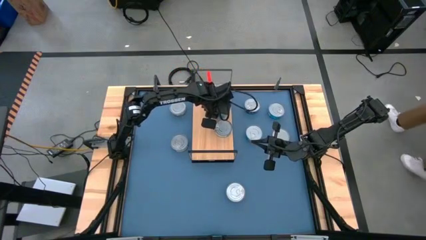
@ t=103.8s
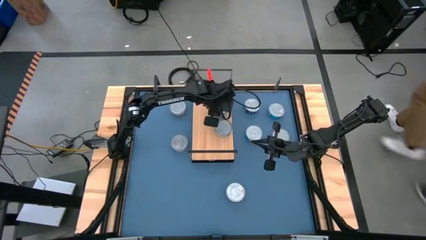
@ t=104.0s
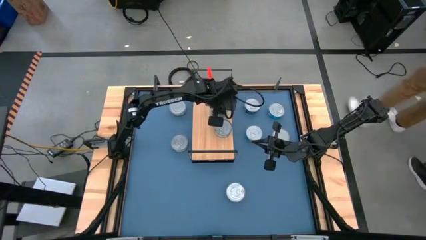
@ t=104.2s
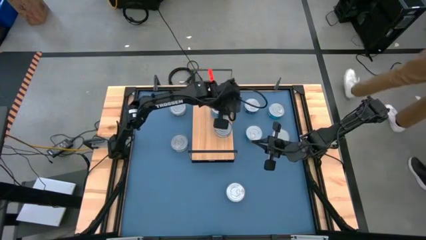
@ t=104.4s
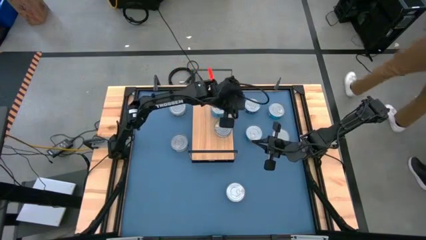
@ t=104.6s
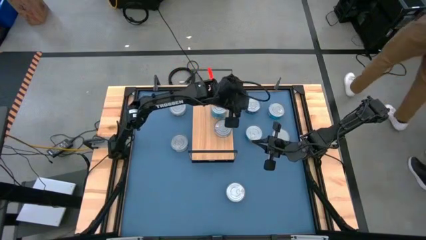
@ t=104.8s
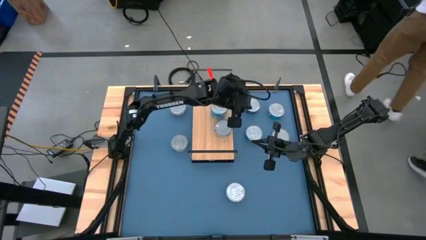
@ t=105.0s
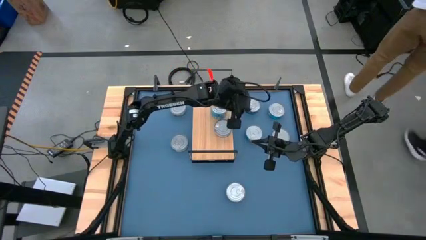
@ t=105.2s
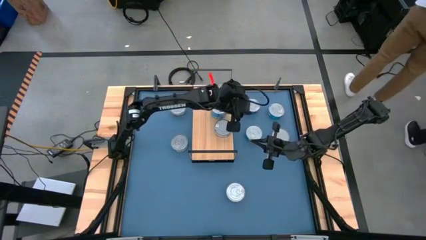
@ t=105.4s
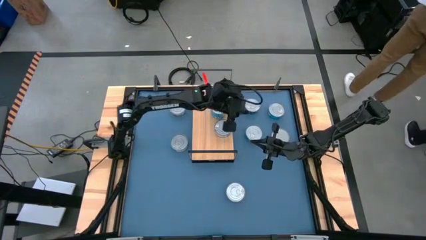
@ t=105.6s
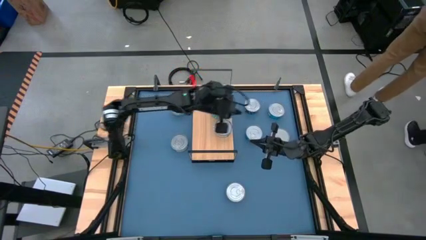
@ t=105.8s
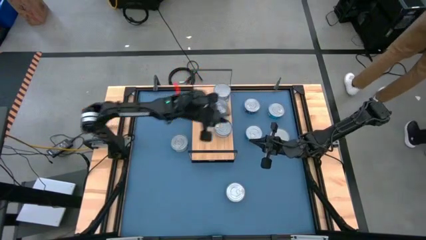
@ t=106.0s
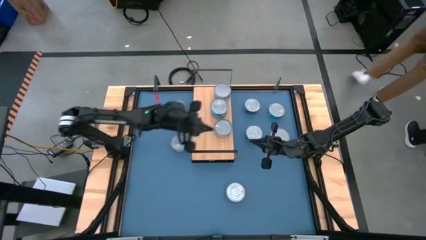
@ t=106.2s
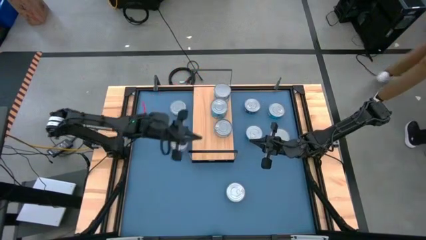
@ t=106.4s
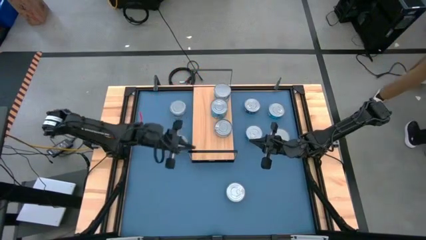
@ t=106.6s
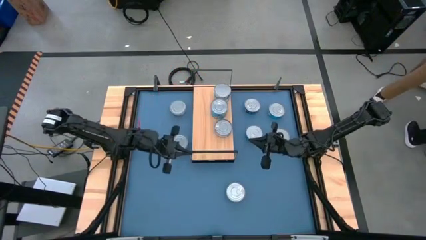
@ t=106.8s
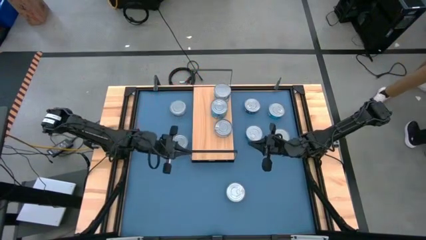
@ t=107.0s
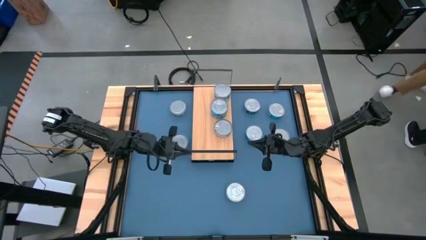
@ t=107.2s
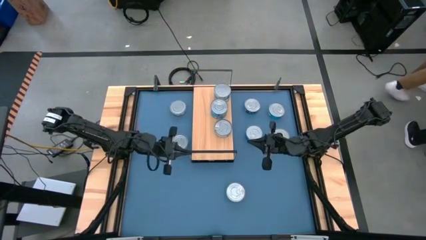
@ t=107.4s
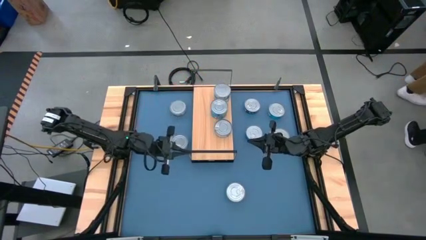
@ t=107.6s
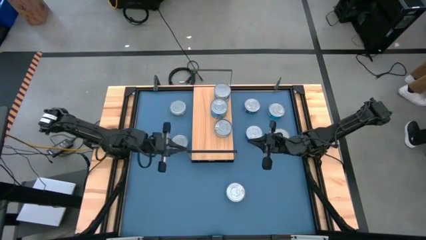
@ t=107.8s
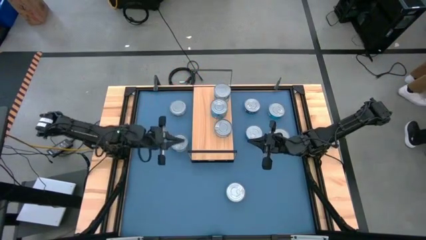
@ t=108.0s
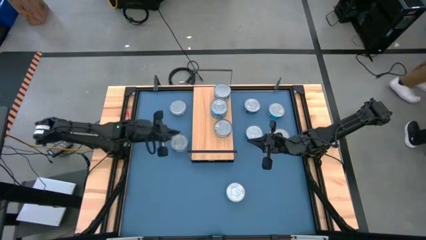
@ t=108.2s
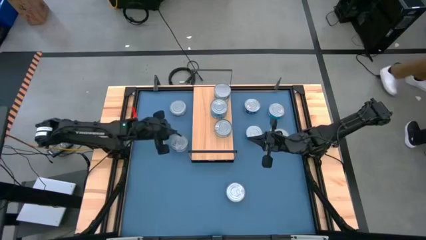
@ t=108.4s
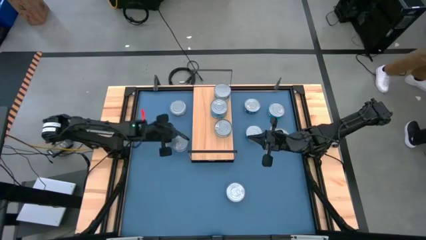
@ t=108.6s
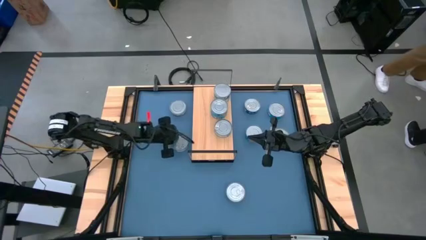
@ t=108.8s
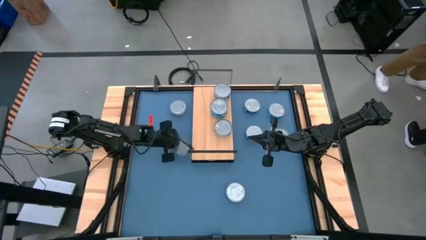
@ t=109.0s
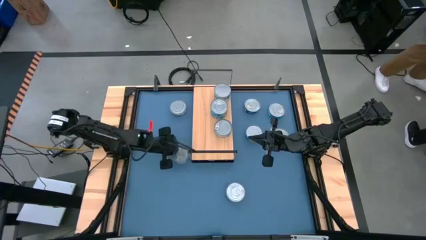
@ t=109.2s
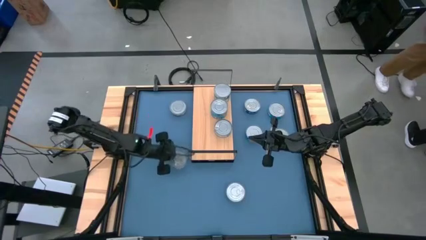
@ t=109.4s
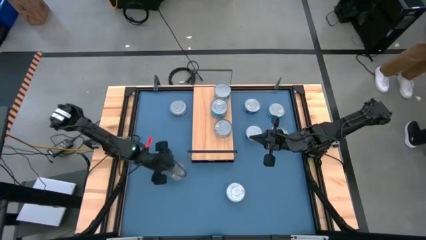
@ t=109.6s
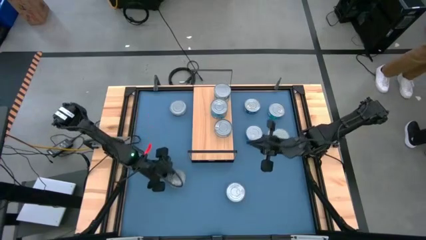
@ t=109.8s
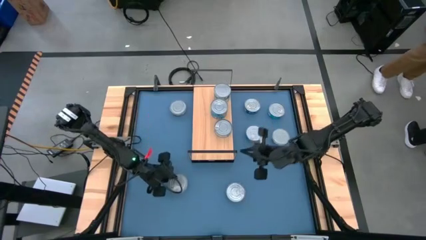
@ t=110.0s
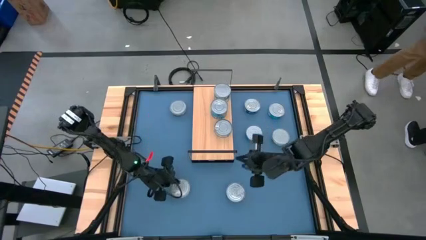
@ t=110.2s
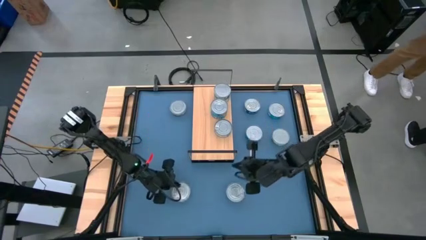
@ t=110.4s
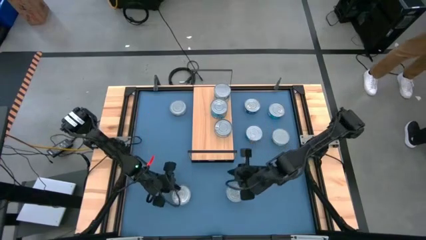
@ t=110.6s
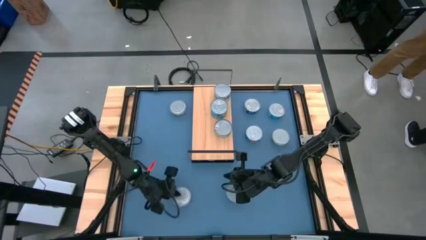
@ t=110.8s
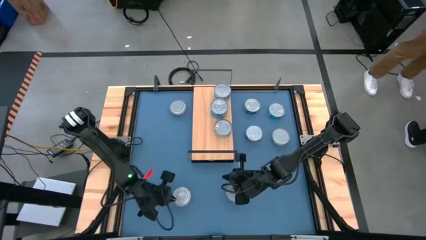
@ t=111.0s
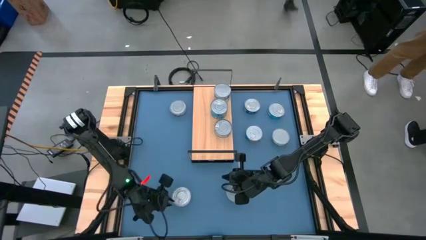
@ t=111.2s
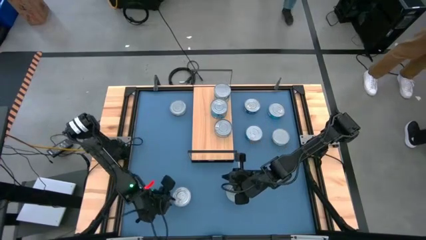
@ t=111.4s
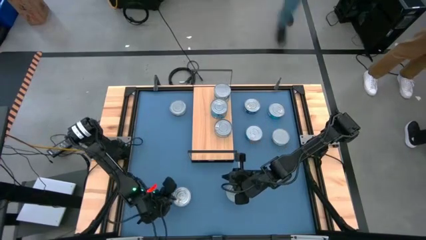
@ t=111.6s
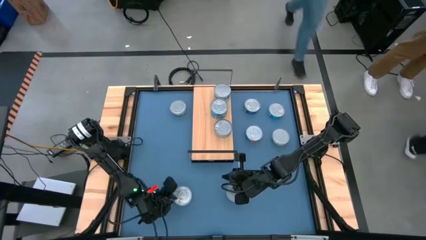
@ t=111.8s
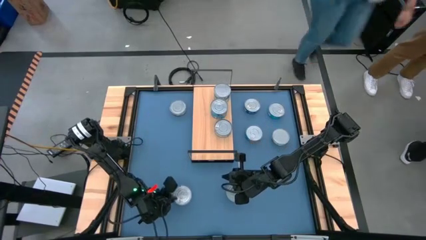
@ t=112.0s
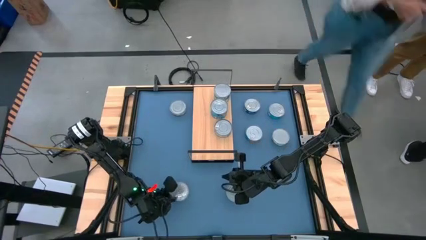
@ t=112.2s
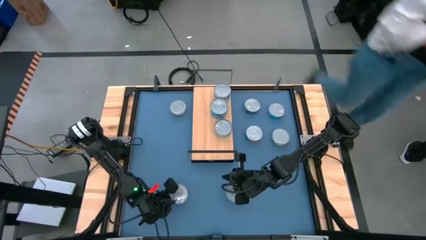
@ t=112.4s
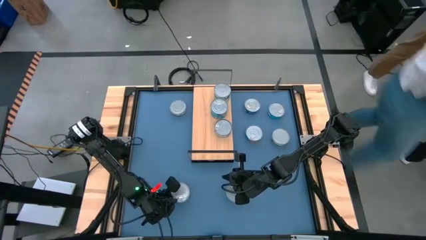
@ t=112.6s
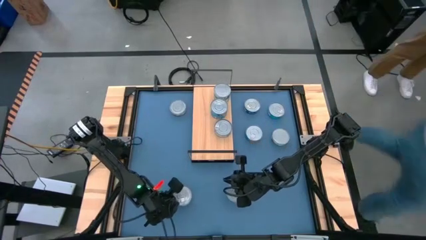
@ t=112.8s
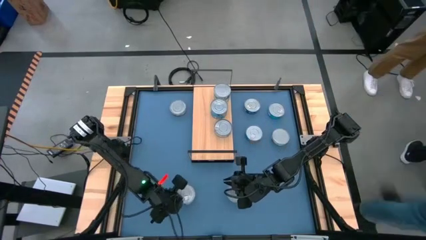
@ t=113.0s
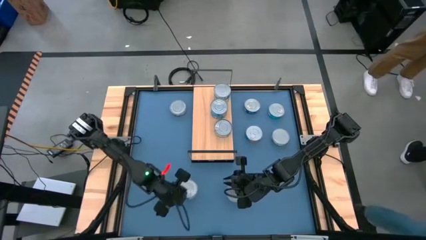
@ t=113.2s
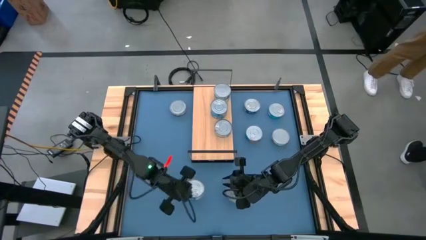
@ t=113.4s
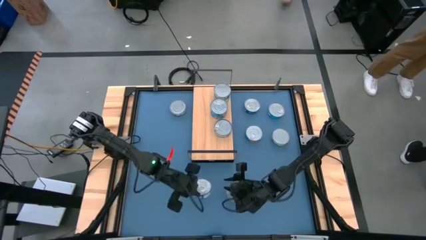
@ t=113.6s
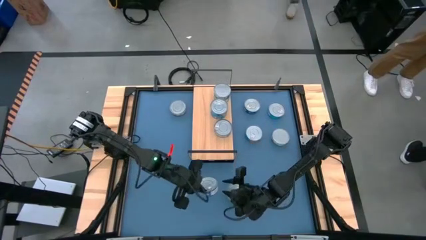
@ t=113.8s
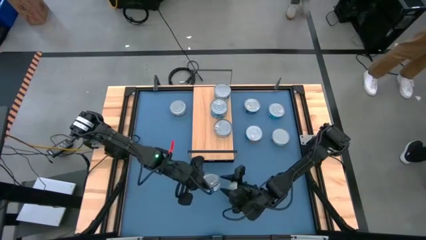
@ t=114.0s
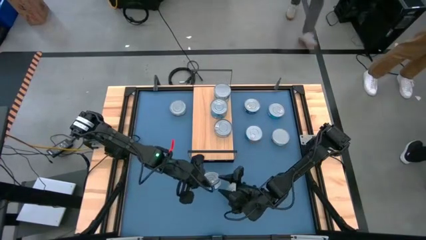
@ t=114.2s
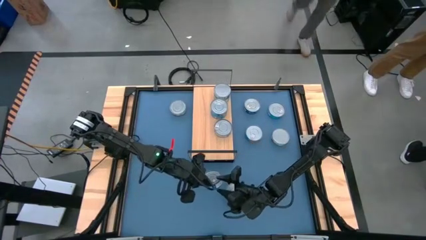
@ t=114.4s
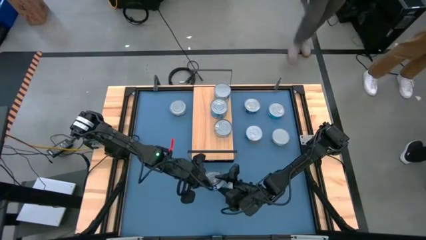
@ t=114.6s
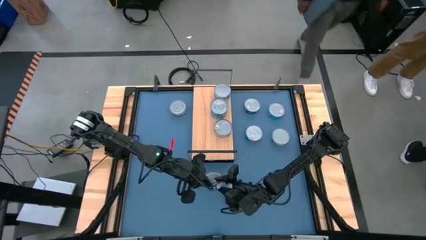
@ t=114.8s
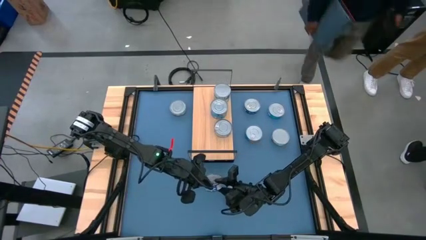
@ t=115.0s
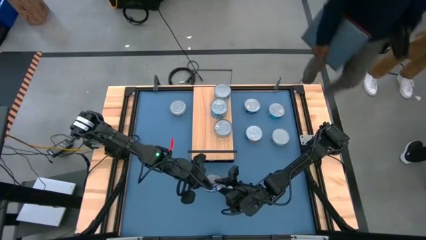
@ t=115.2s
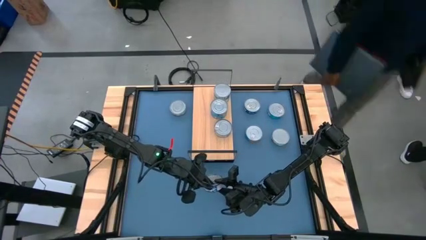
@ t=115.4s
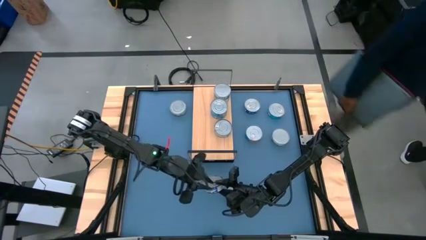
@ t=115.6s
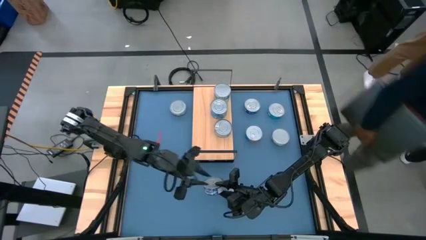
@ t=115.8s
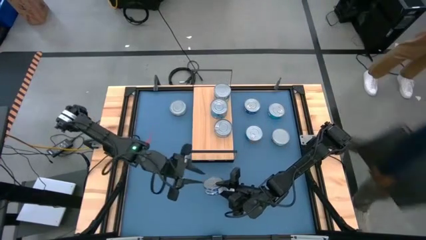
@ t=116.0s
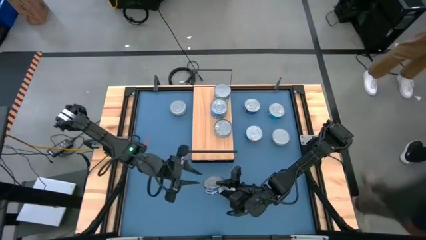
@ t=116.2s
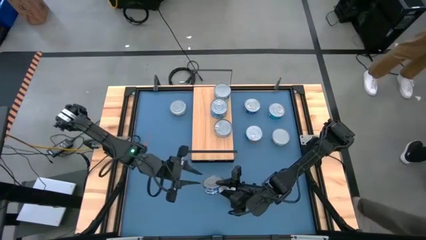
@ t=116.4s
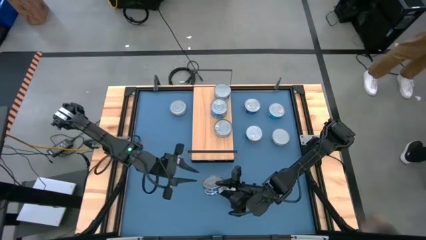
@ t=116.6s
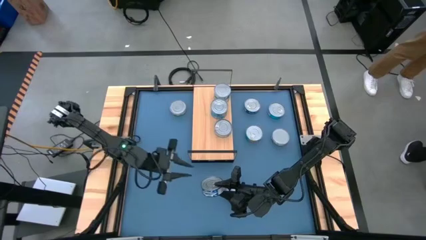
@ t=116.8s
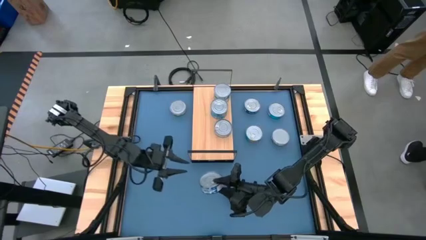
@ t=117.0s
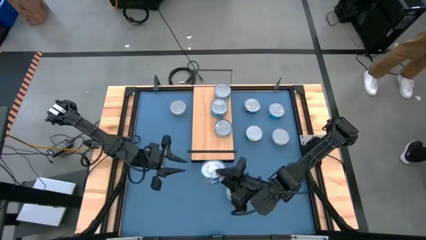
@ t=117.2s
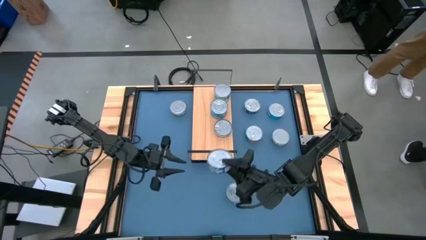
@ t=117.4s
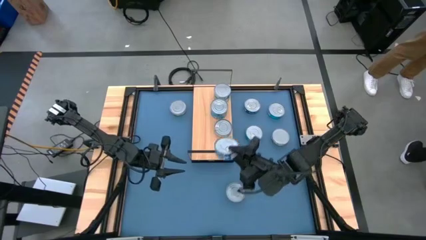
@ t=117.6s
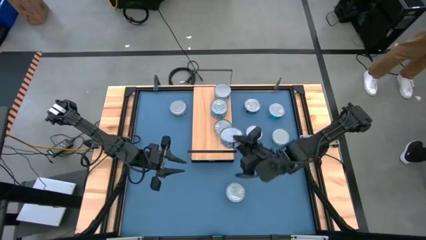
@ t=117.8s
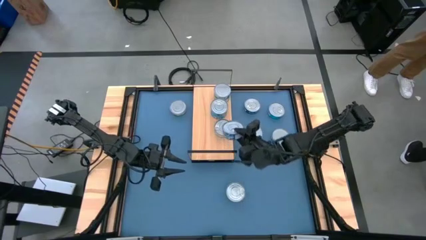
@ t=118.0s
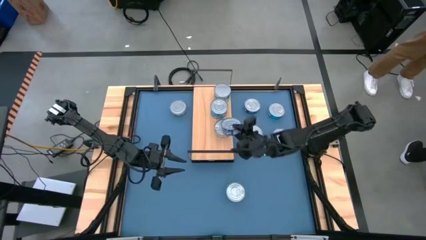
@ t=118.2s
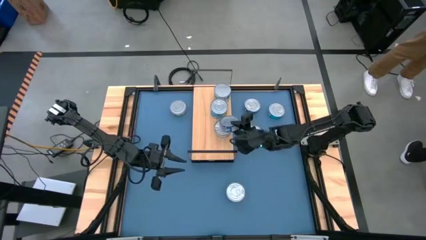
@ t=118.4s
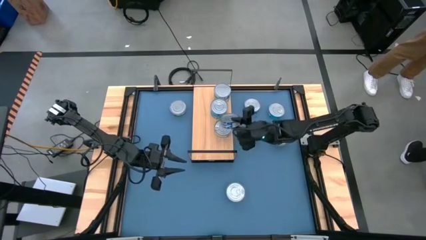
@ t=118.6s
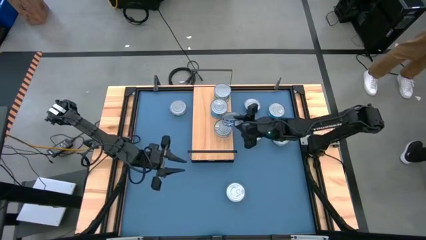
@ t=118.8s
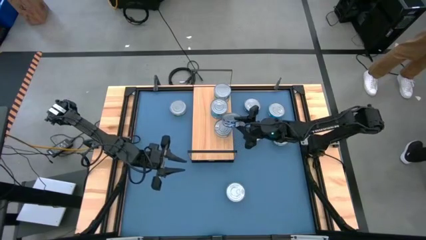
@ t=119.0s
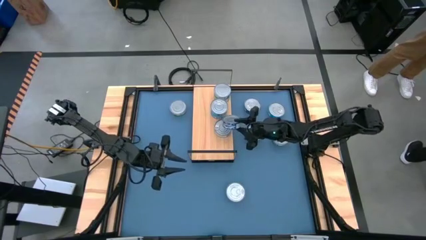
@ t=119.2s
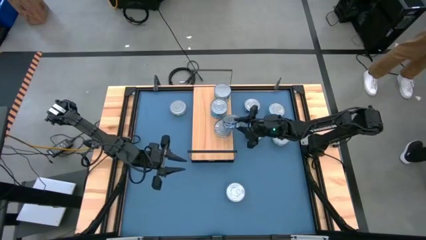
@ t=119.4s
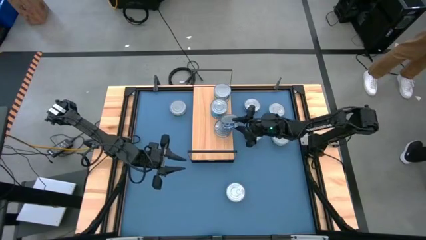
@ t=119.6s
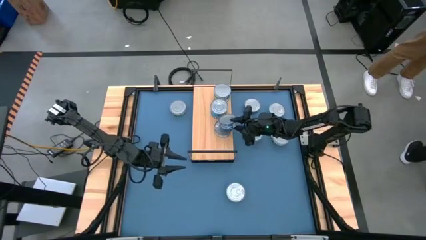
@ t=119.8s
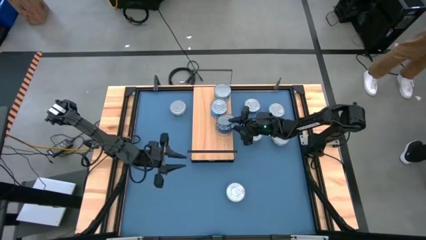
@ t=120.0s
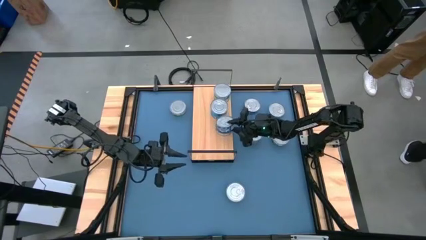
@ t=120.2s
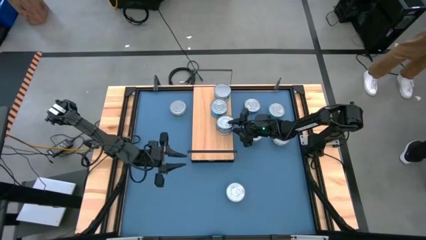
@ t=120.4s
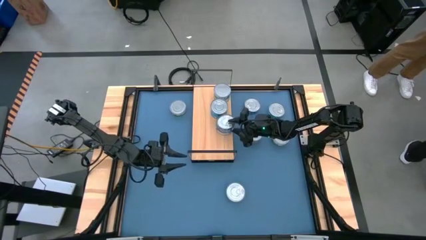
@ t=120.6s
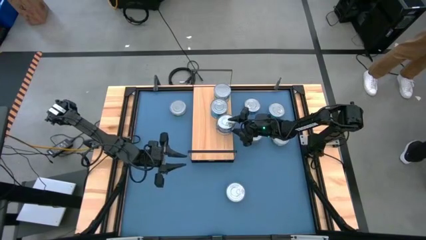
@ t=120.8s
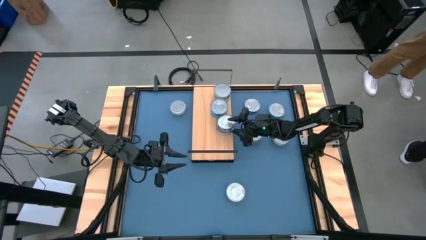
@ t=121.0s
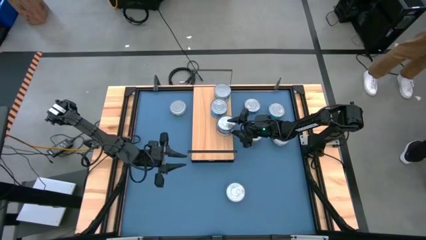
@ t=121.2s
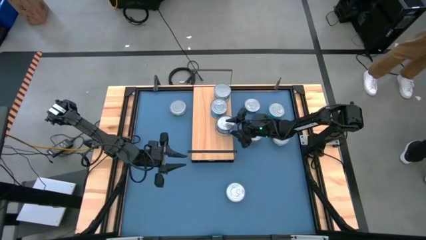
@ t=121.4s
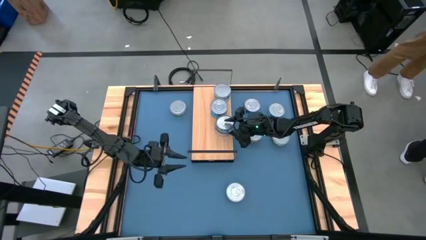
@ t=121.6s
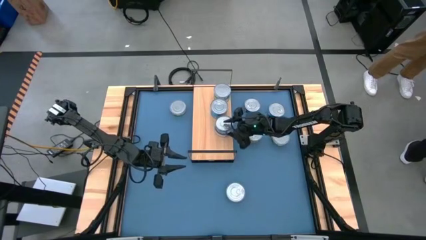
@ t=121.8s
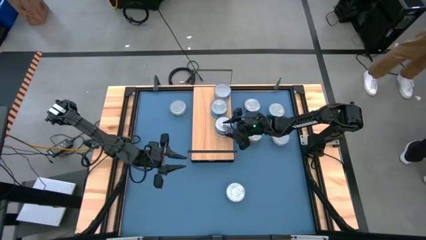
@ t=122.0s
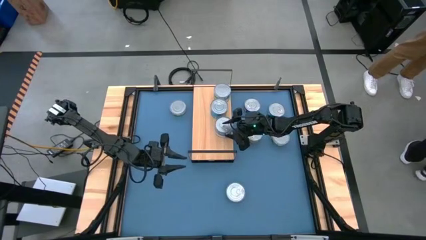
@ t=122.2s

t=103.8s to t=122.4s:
Task: Stack canned seafood by type on shelf
Stack the blue tuna can on top of the other blue tuna can on the shelf
